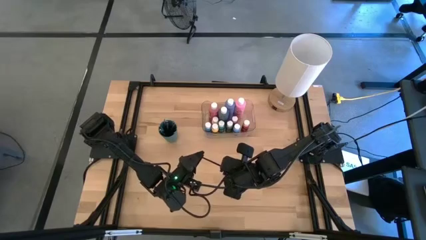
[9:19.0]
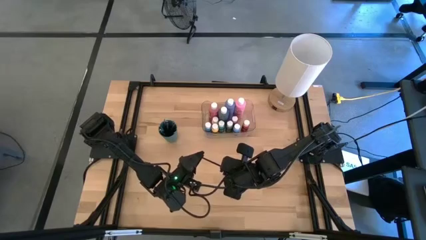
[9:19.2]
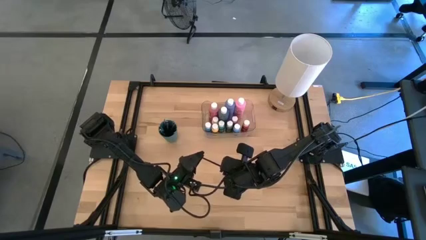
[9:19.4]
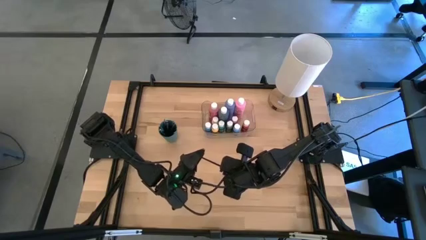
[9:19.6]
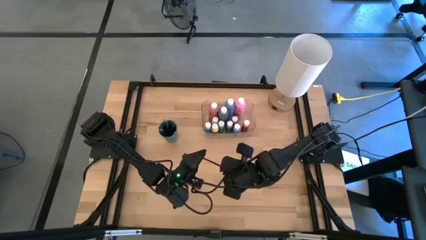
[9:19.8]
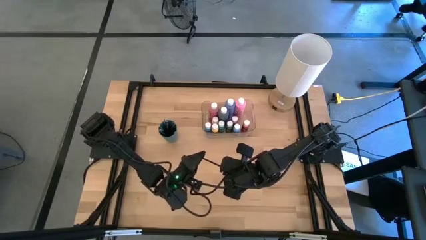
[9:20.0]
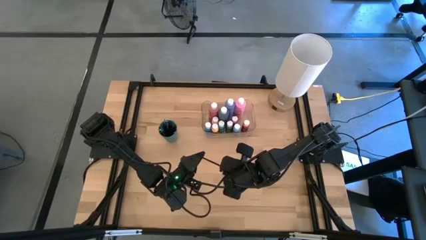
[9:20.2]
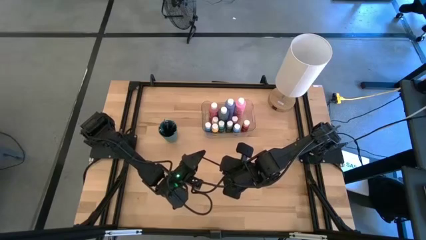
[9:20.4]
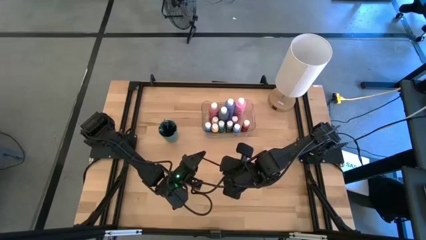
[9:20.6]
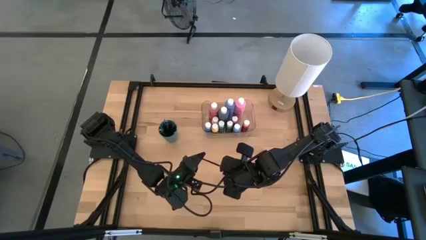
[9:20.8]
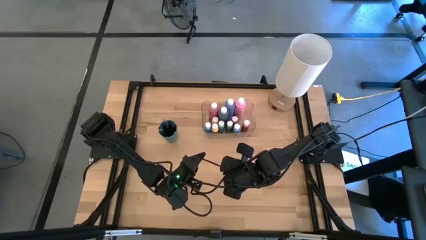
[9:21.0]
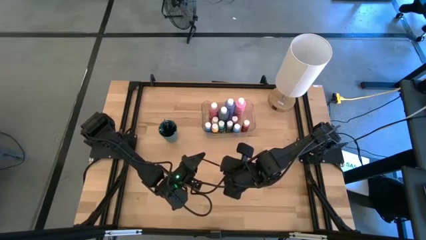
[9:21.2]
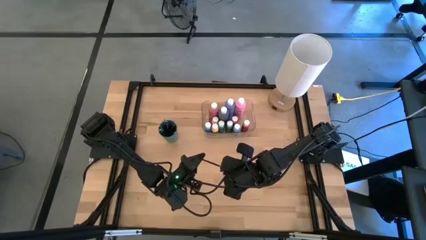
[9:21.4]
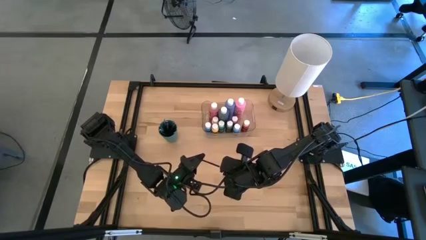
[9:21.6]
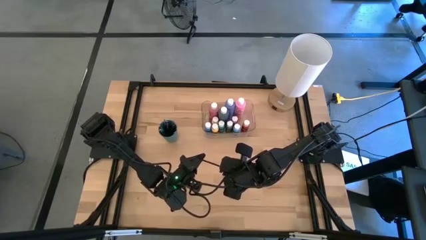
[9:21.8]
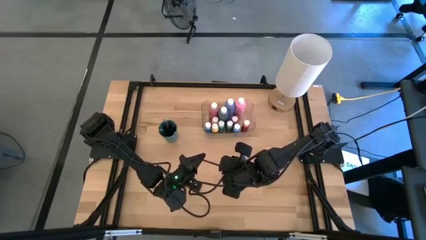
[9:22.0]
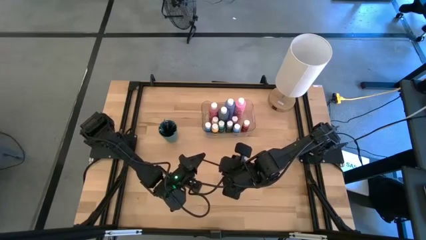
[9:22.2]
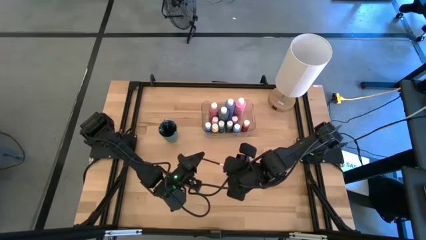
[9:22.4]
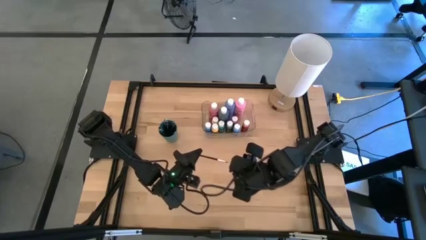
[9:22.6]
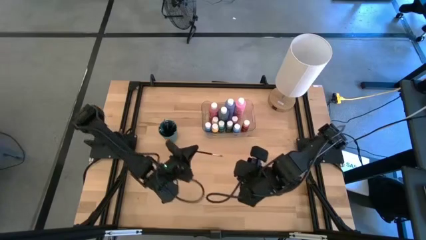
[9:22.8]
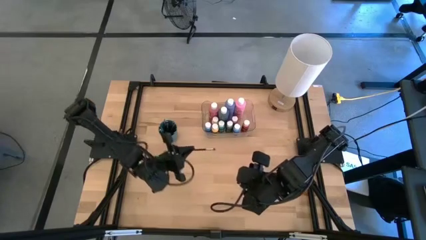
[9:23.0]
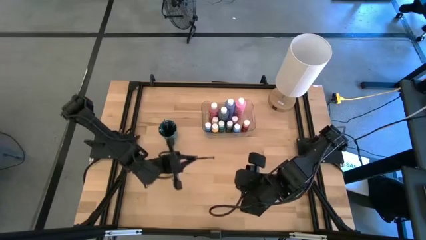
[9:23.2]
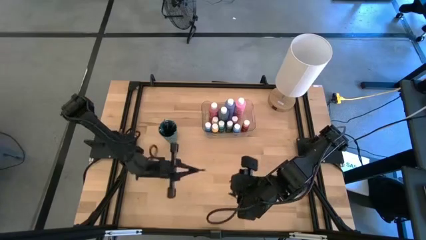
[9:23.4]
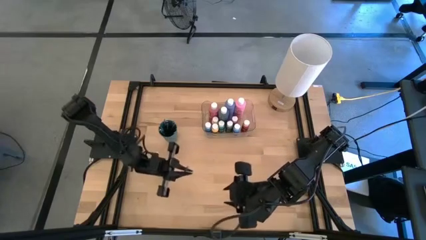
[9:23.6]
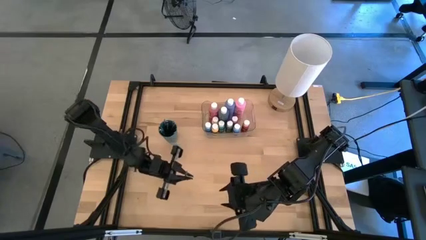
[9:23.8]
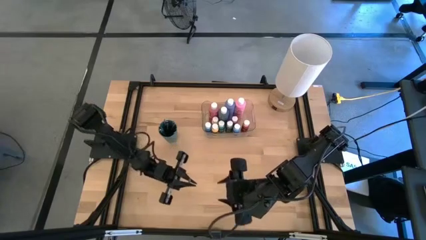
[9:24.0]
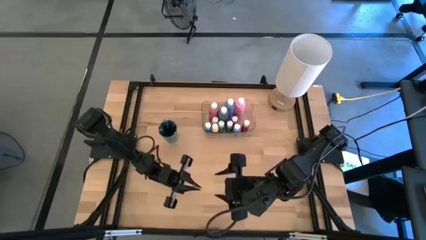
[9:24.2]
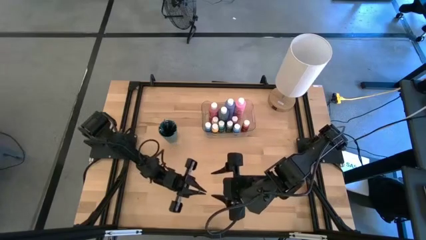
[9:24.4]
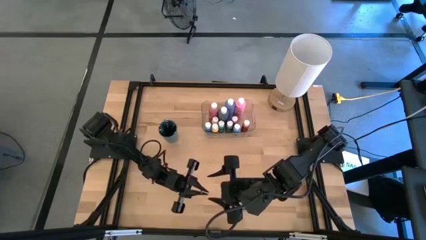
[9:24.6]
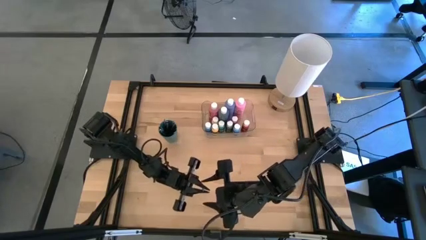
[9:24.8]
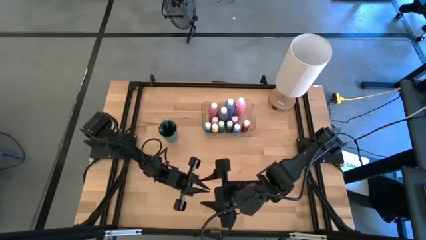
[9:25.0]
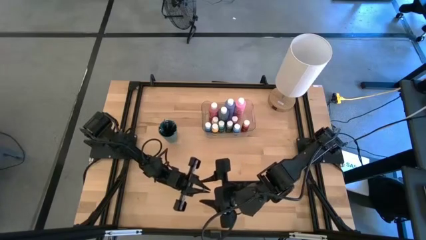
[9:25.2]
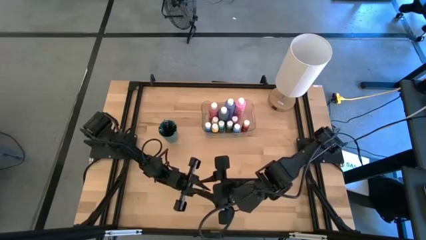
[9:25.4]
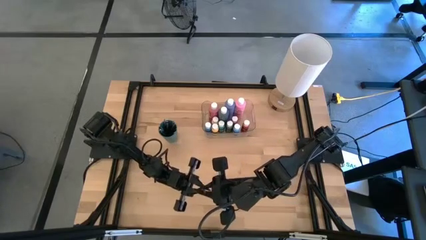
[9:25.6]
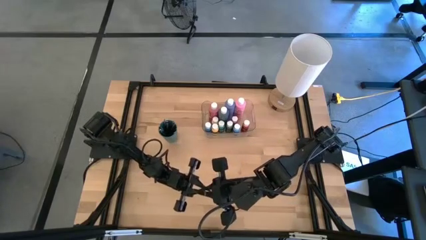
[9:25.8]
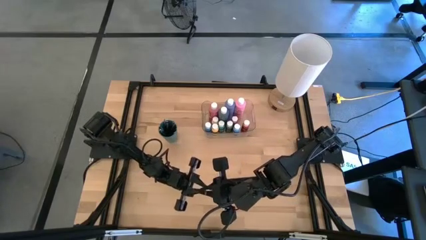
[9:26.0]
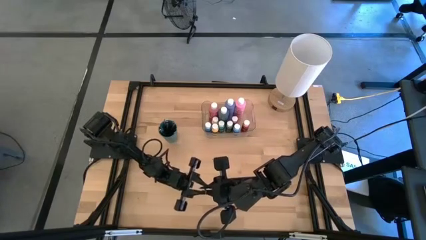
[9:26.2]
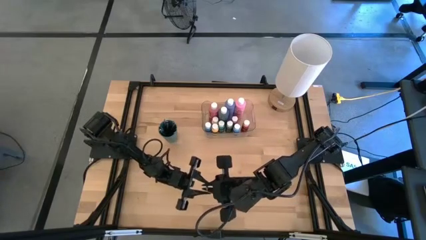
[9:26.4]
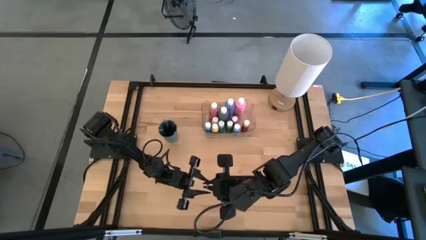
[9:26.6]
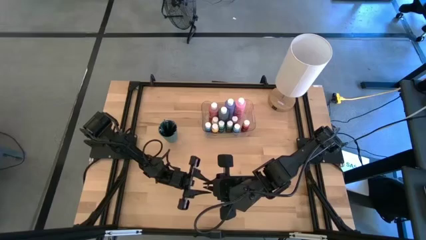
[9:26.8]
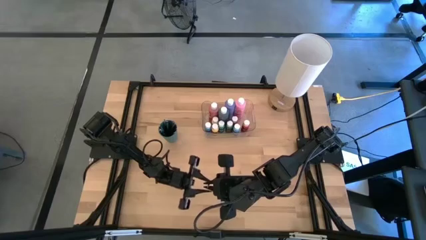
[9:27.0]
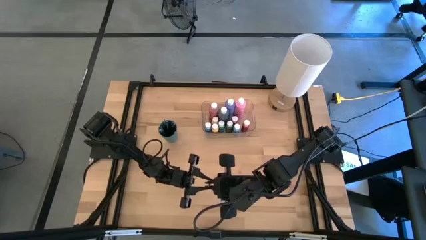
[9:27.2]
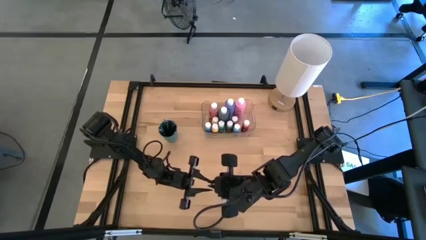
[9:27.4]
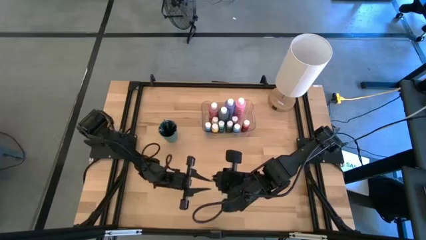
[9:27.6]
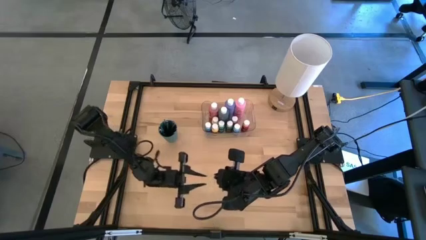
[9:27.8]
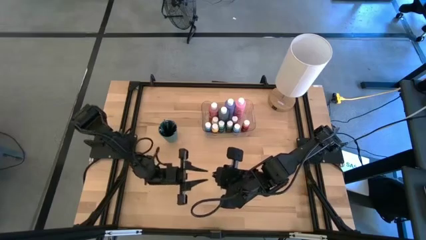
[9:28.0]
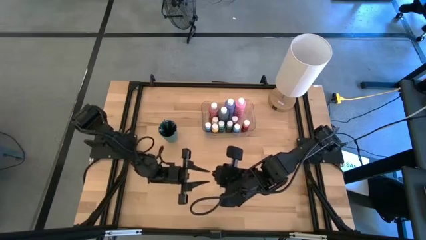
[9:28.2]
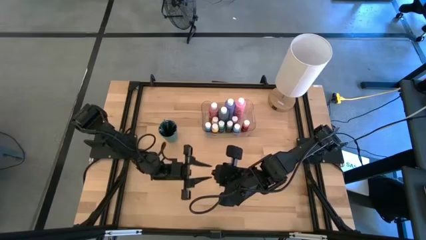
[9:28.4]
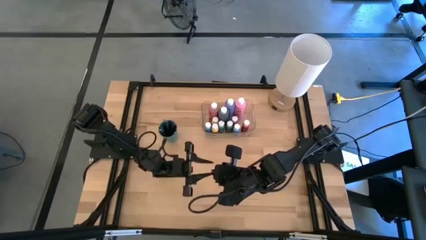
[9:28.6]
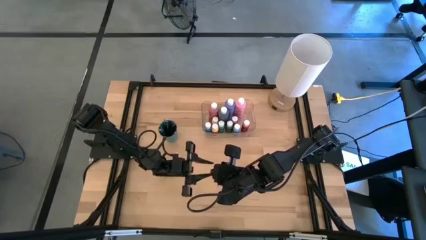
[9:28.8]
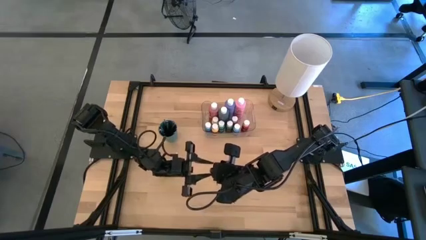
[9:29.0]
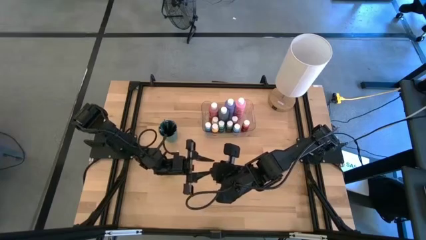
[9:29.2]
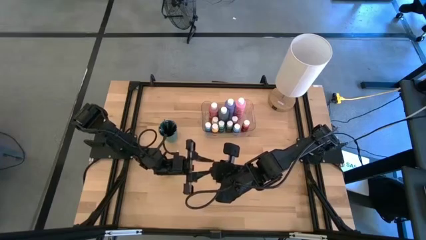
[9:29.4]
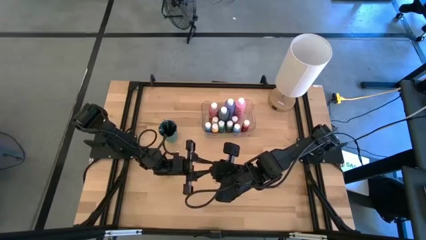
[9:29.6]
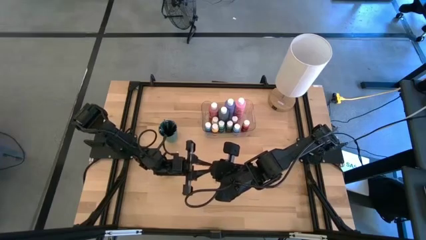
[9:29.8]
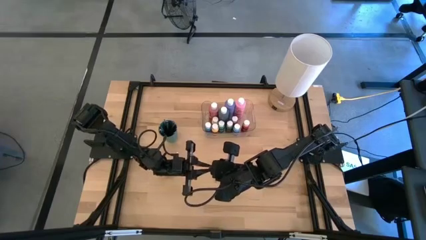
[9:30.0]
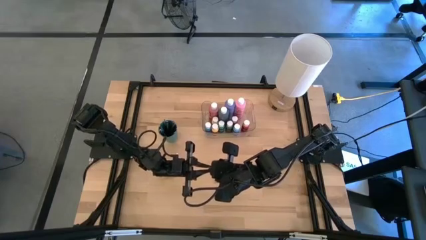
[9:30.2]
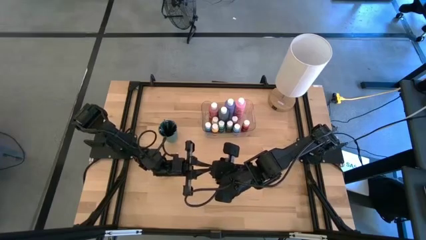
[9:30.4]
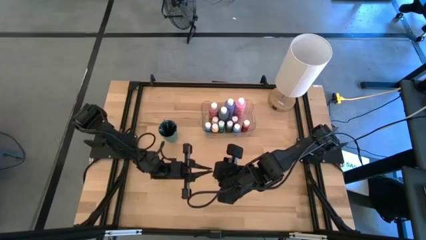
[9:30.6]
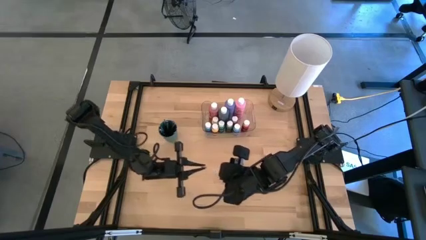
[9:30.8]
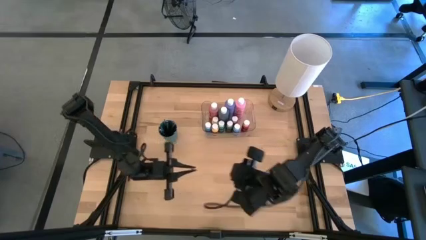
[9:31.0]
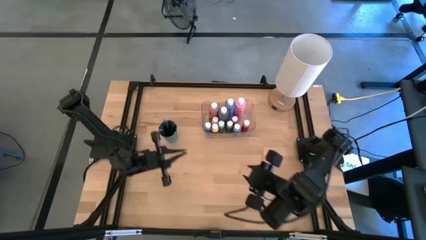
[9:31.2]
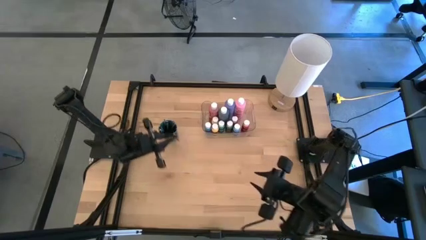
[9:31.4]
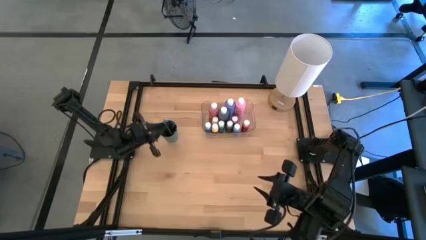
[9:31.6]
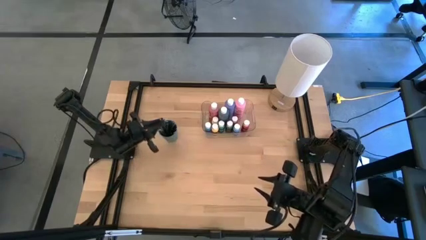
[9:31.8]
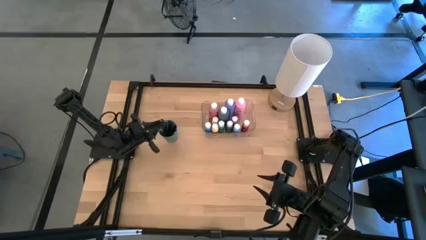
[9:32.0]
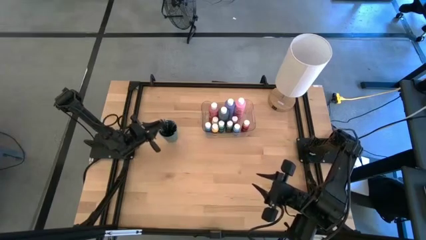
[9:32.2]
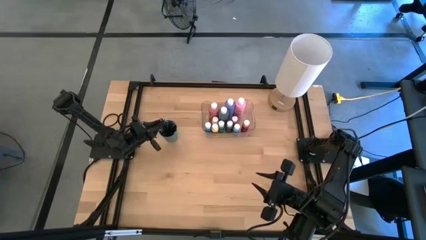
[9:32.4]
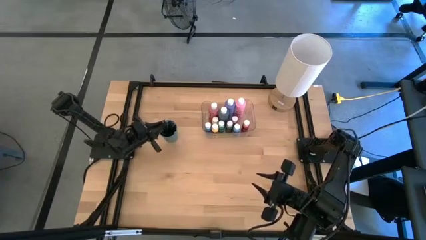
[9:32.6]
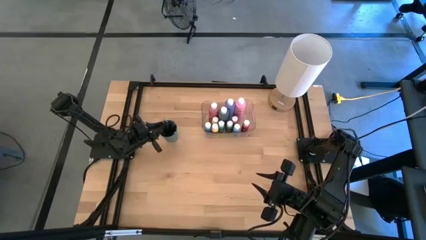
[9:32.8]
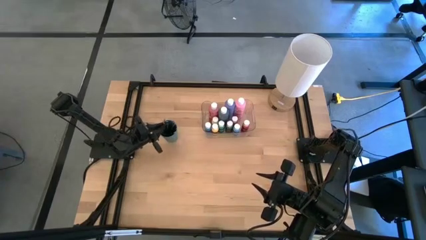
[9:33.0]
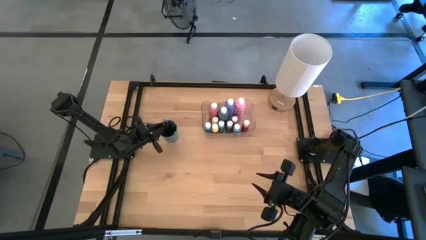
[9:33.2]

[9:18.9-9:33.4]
Task: Pick & Place Paint Supplies
Put the black paint brush into the green cup

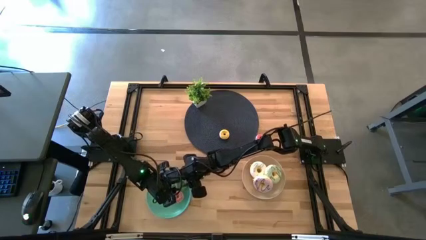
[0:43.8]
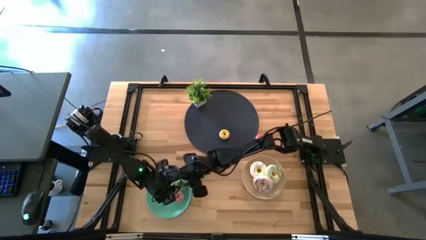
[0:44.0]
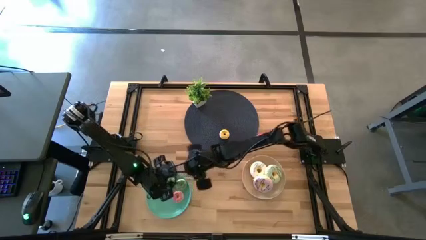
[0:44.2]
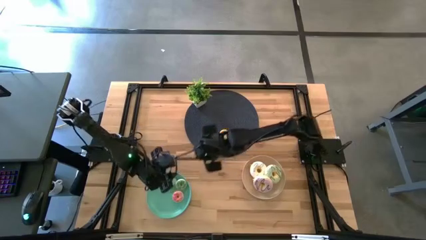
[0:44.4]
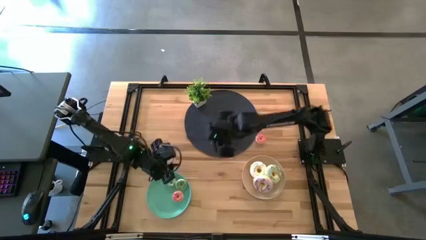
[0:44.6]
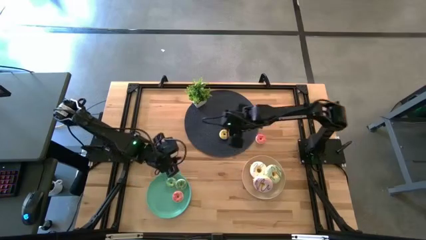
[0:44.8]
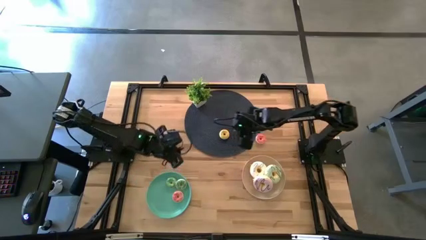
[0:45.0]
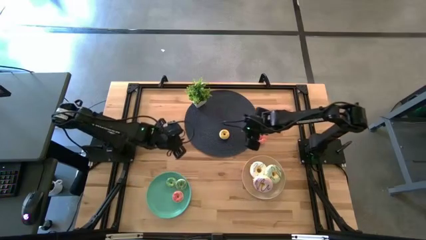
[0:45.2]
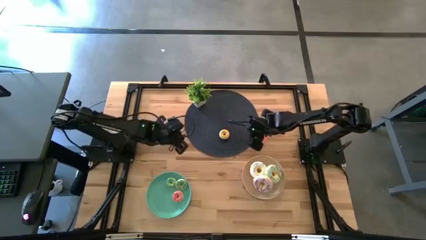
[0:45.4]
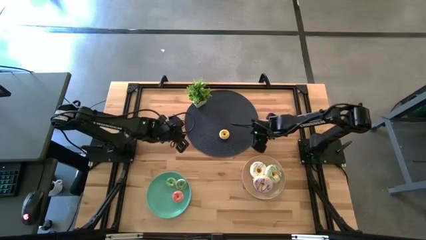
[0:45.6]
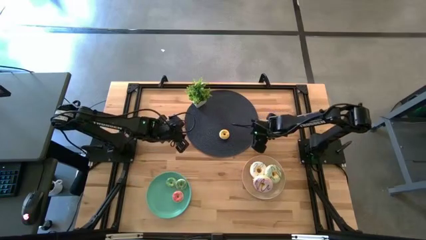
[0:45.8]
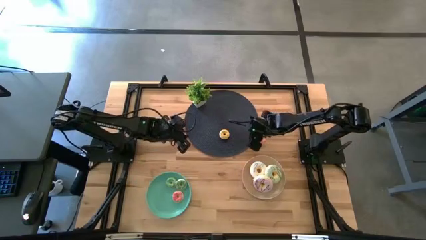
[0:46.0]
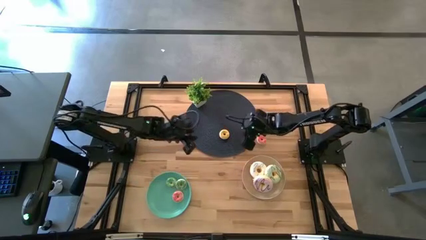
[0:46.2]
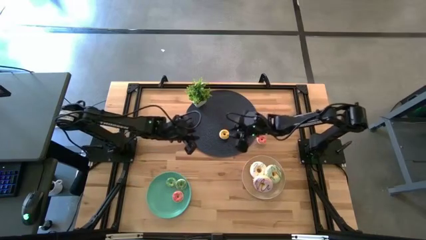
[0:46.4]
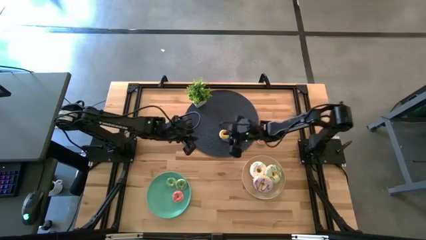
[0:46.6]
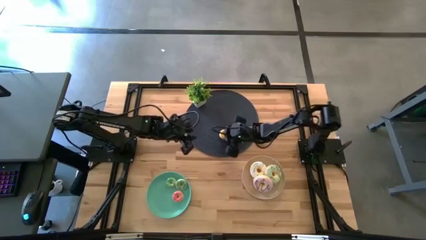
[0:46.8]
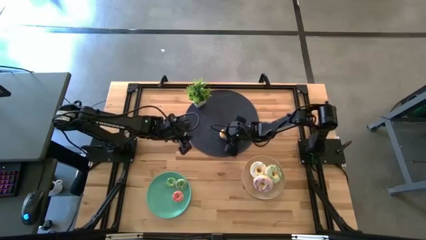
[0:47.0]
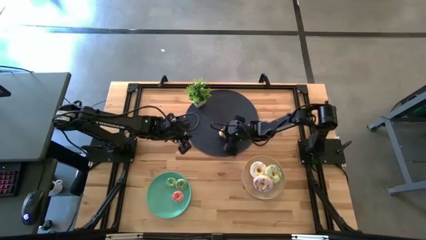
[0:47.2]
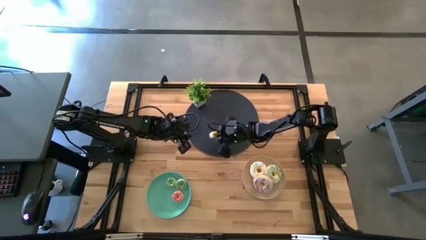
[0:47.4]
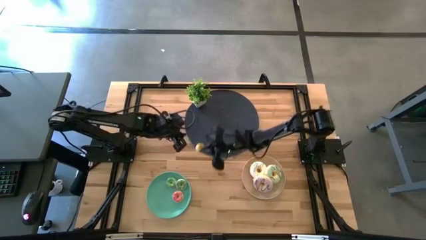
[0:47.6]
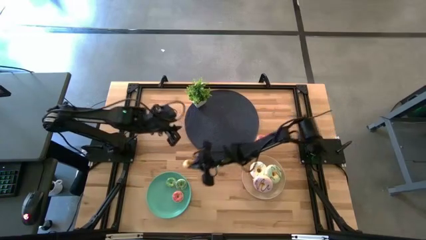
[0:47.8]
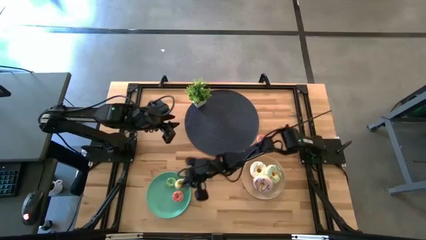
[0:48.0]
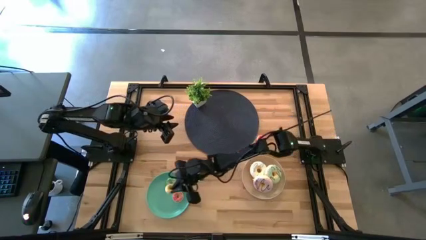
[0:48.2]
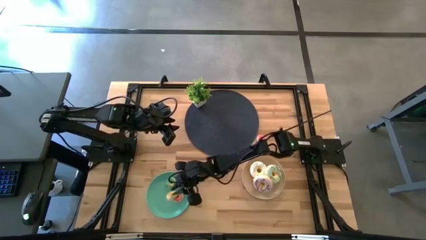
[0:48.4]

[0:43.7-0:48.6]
Task: Pick & Place donuts
Put the small yellow donut on the blue plate
